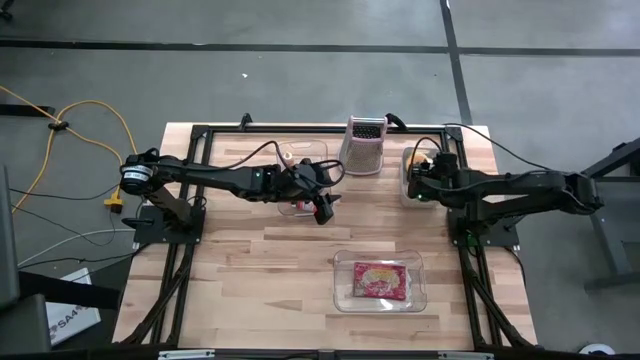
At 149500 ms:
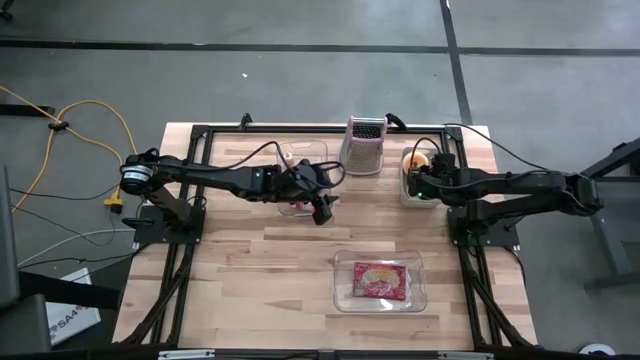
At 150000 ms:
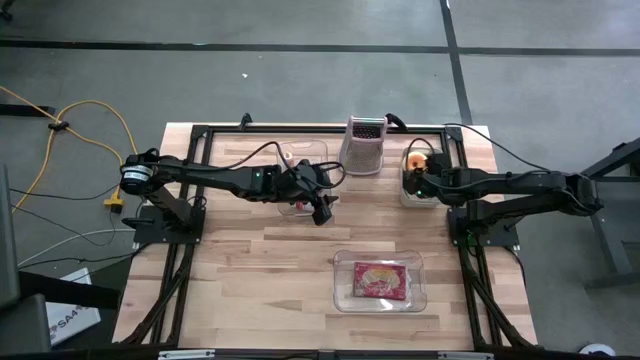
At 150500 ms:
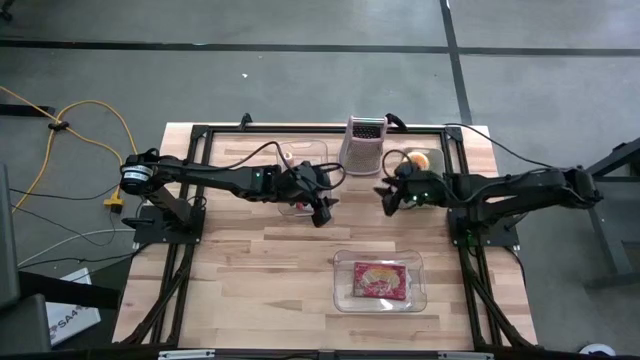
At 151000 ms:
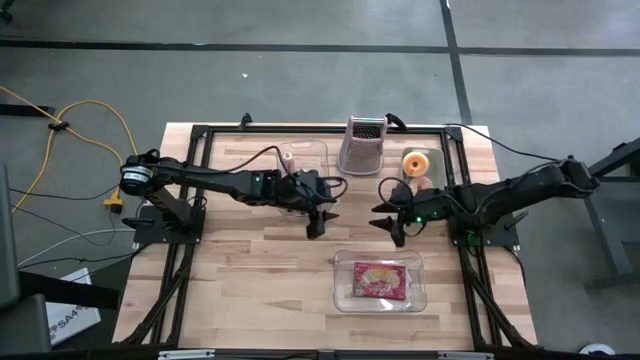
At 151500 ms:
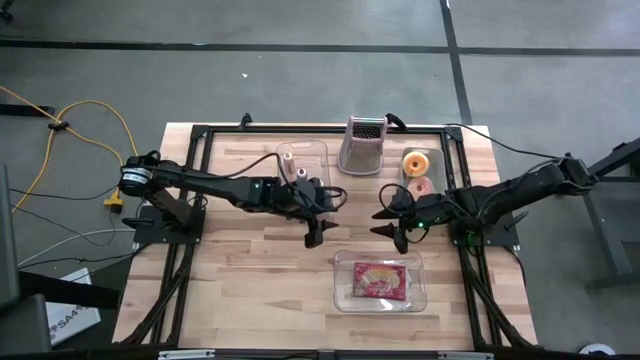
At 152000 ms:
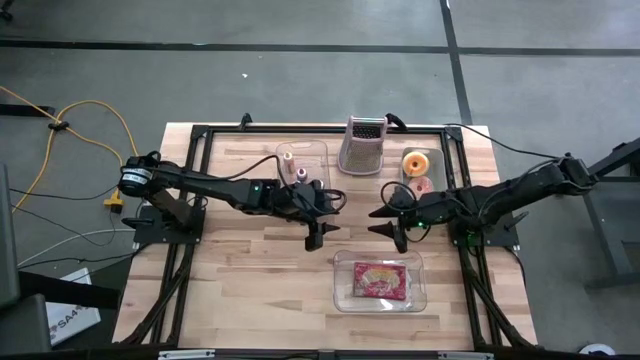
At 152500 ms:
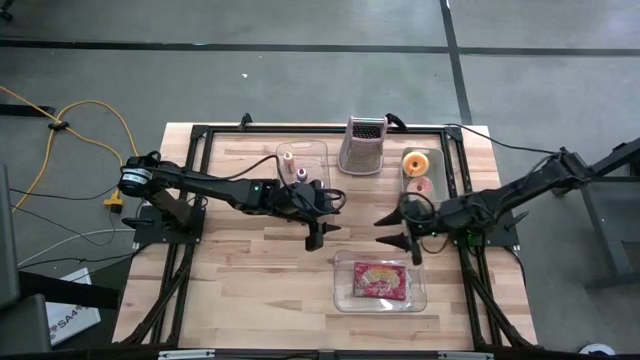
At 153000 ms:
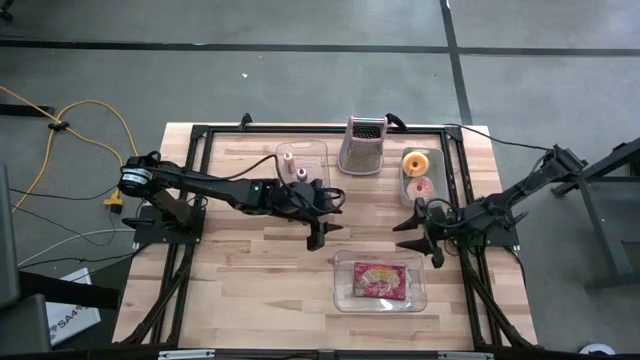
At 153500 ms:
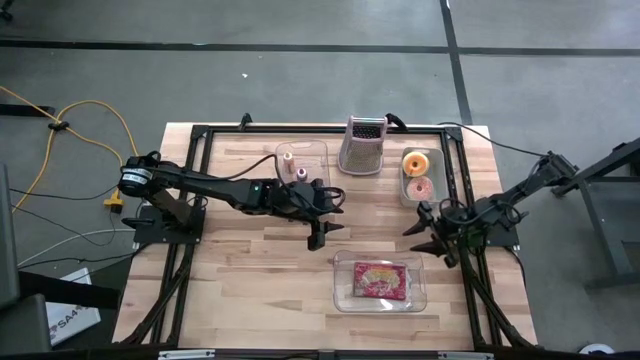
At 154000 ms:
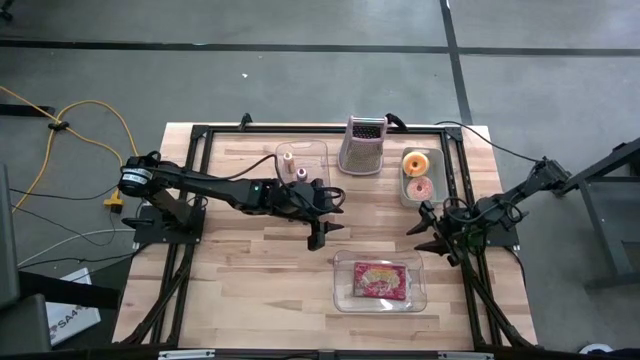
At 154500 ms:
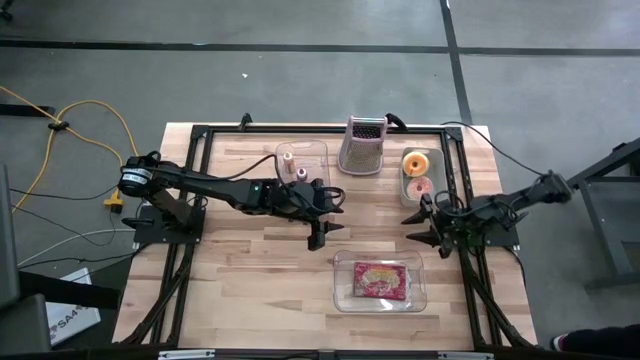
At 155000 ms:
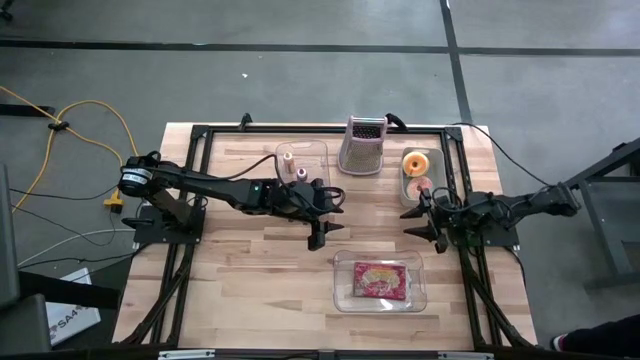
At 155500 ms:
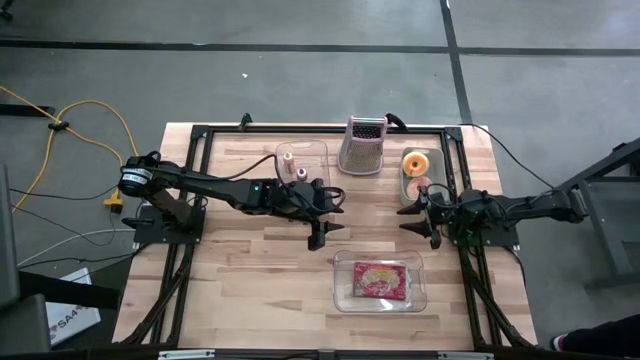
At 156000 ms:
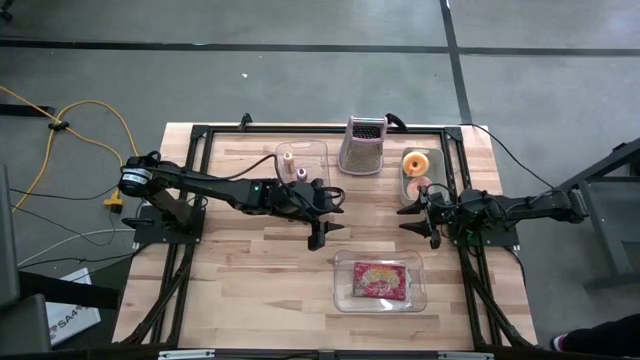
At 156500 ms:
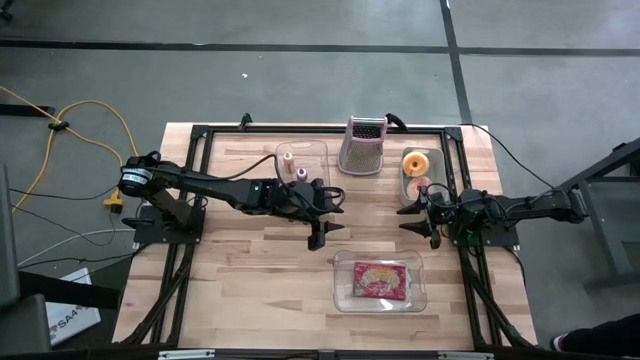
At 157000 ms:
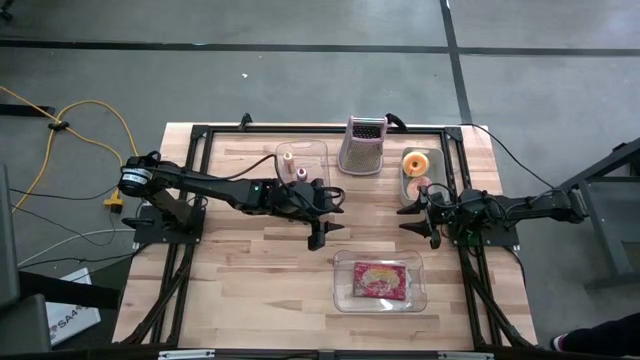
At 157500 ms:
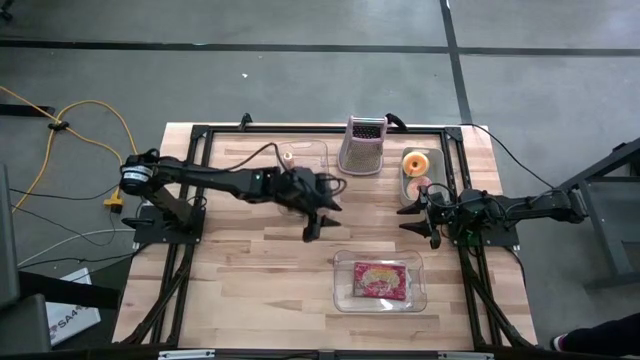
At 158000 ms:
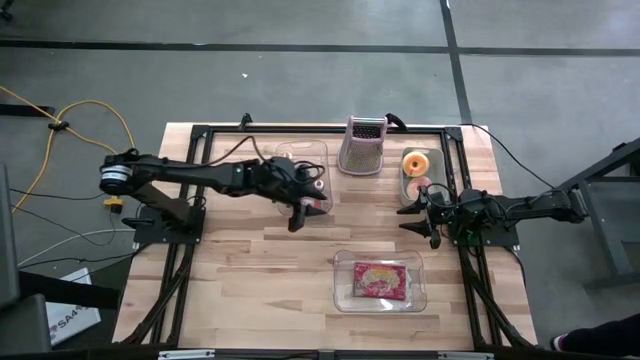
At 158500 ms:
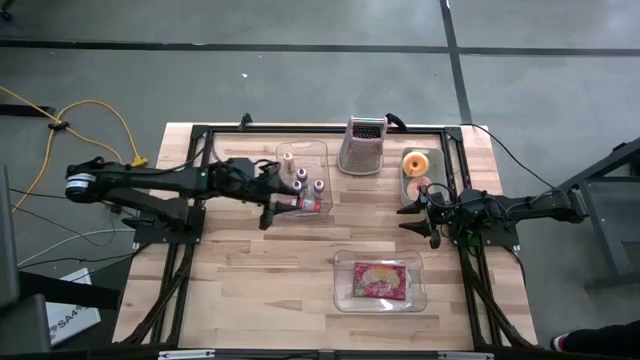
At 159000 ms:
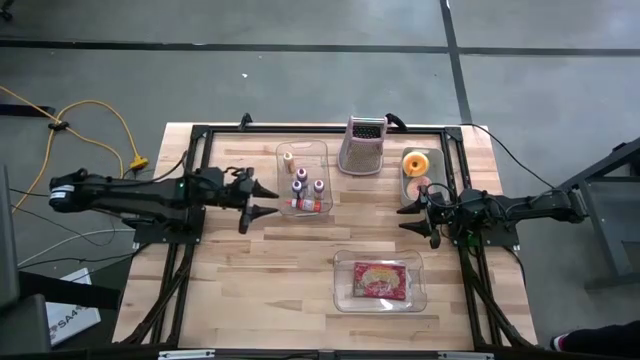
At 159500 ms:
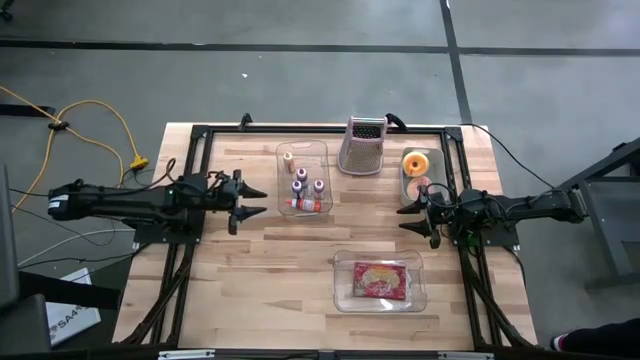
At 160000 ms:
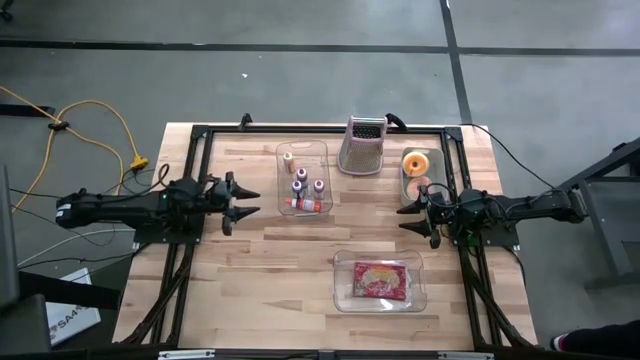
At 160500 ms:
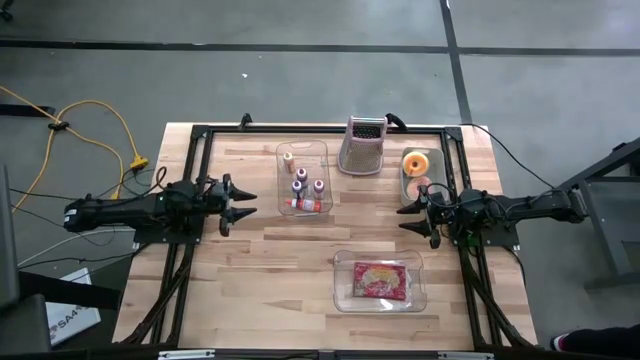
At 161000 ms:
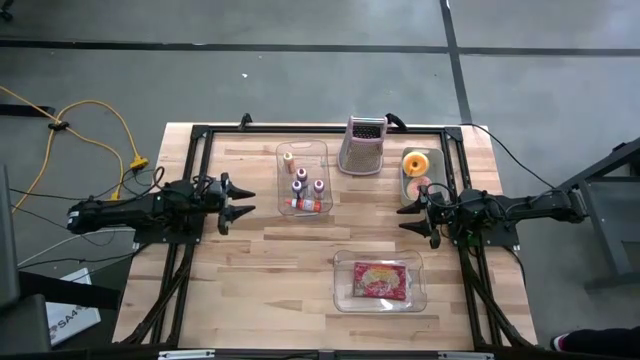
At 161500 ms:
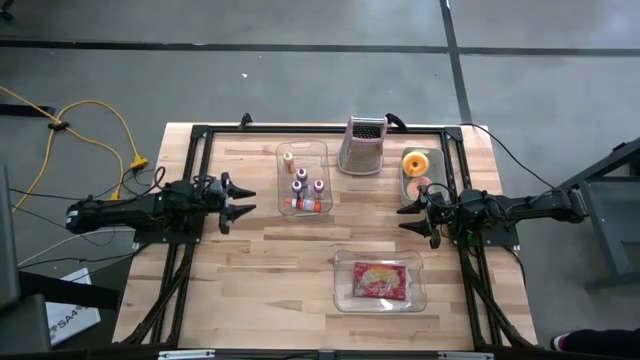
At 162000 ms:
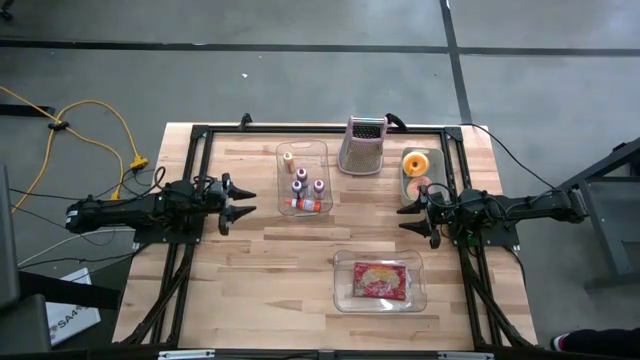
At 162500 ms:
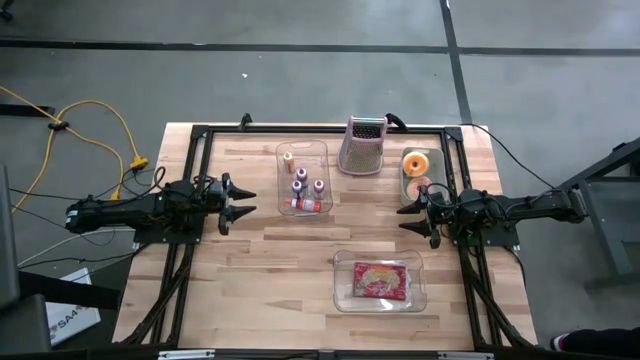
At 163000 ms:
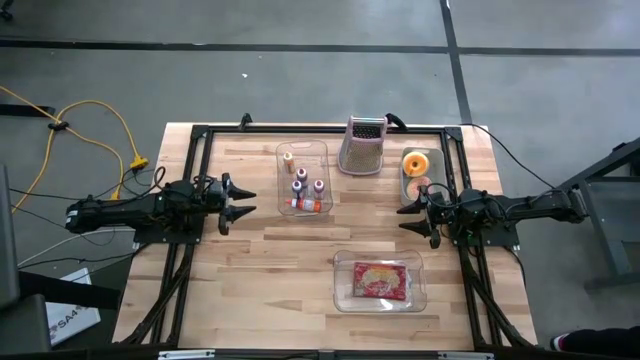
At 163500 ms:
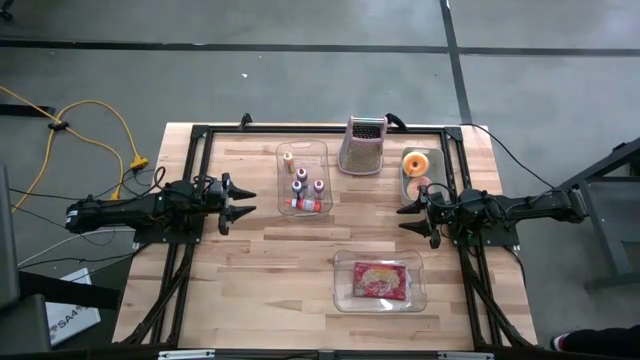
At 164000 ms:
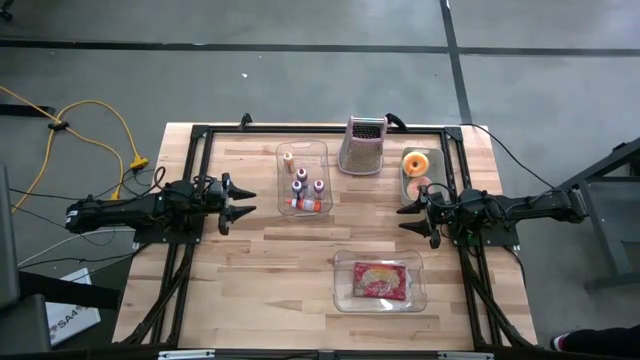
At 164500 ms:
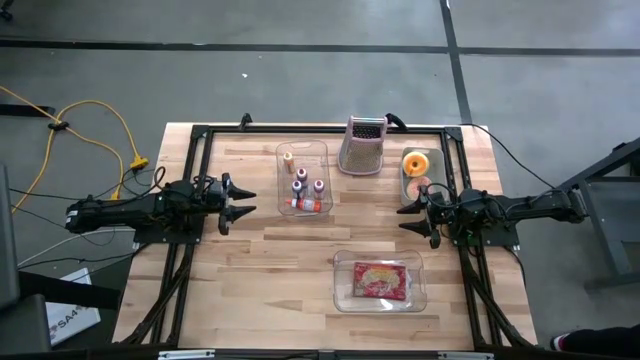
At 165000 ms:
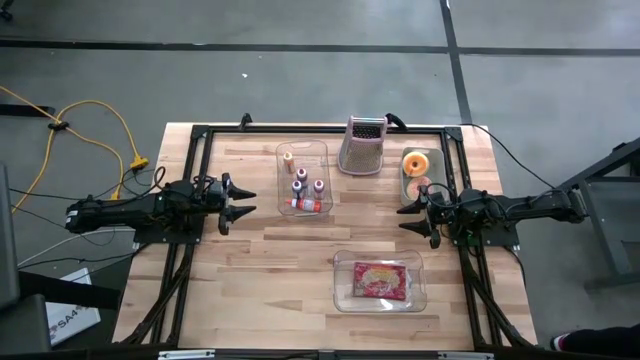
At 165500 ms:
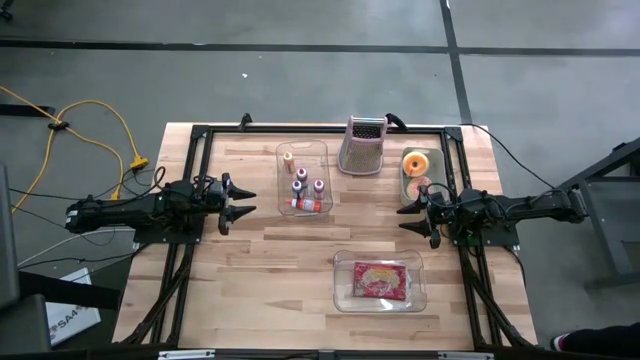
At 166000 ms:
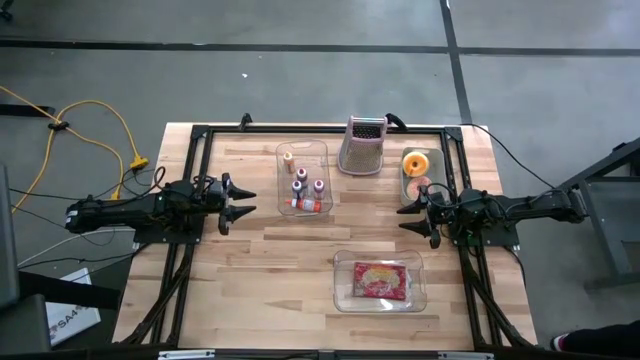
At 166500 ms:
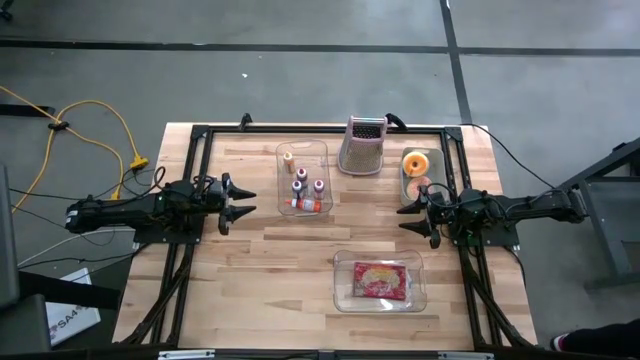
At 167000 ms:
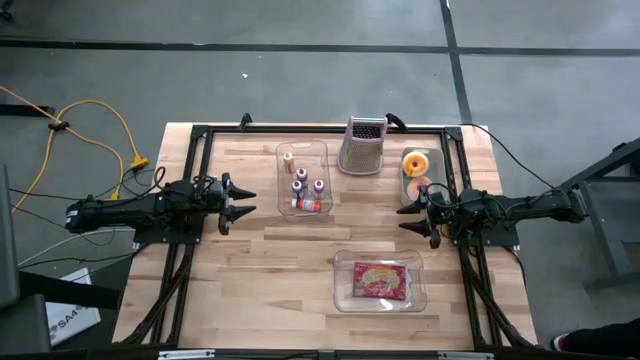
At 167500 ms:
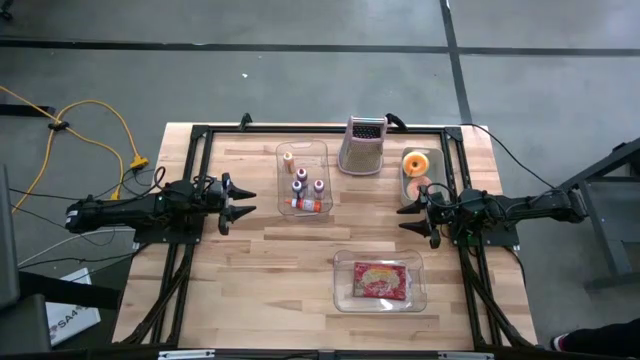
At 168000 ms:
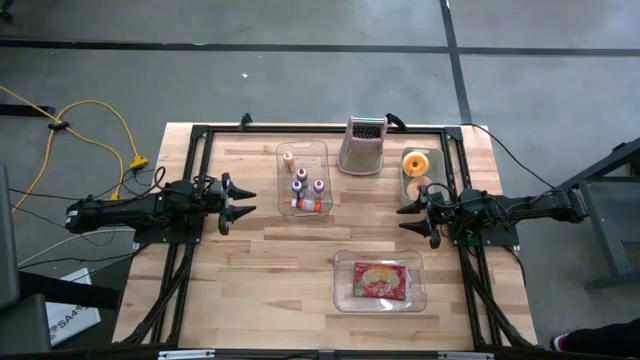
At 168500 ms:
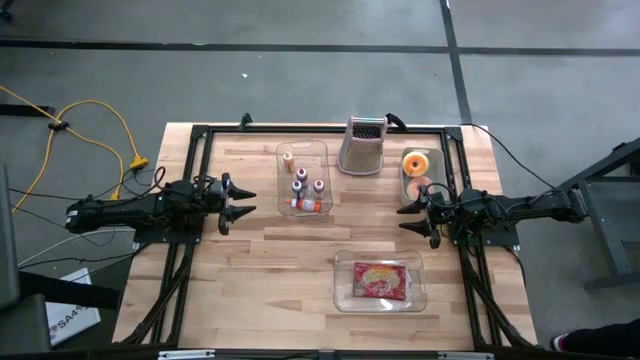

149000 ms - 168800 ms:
Return to Home Position
